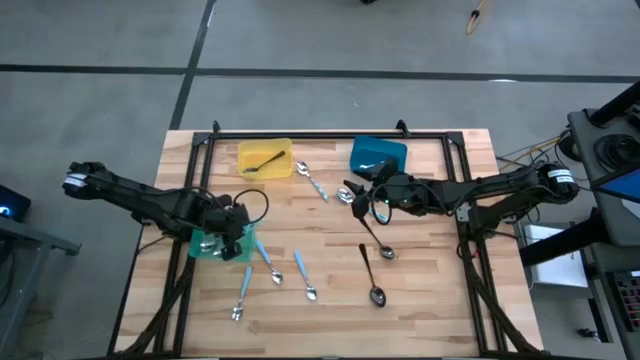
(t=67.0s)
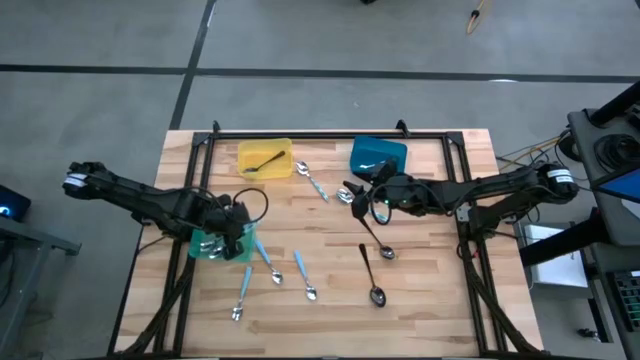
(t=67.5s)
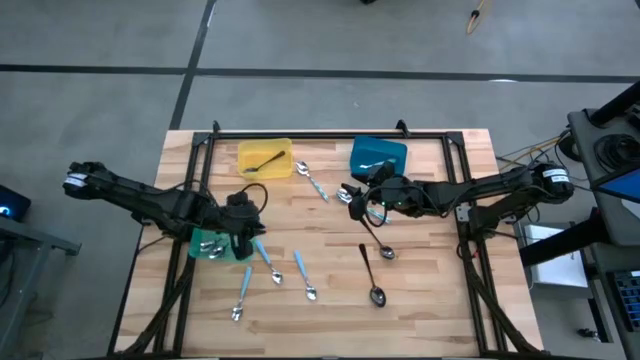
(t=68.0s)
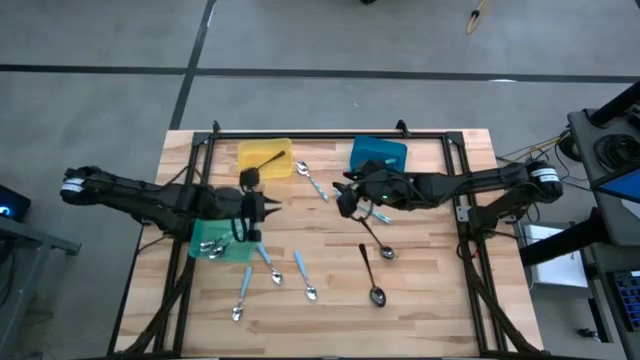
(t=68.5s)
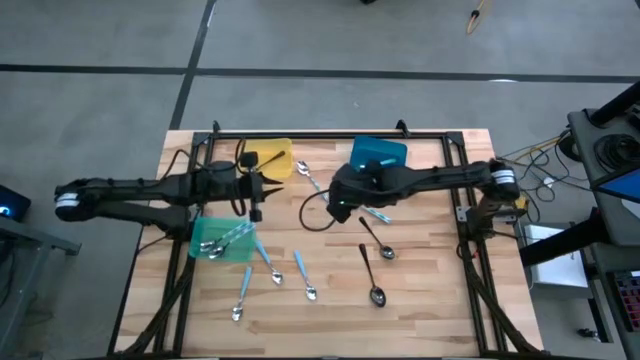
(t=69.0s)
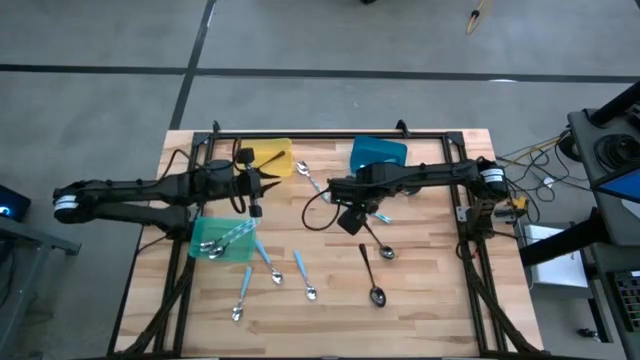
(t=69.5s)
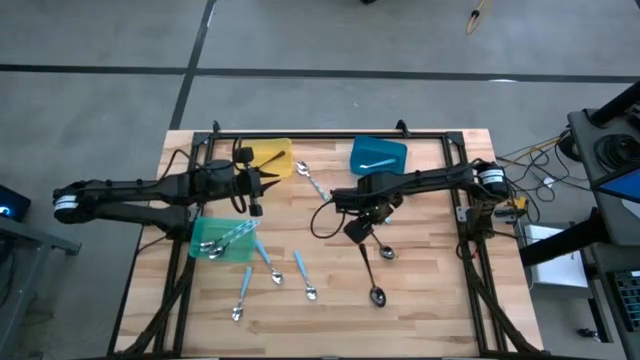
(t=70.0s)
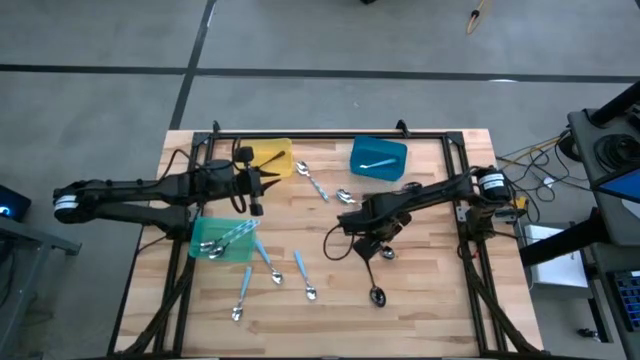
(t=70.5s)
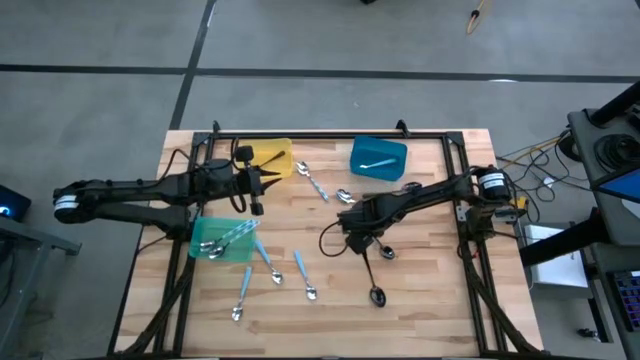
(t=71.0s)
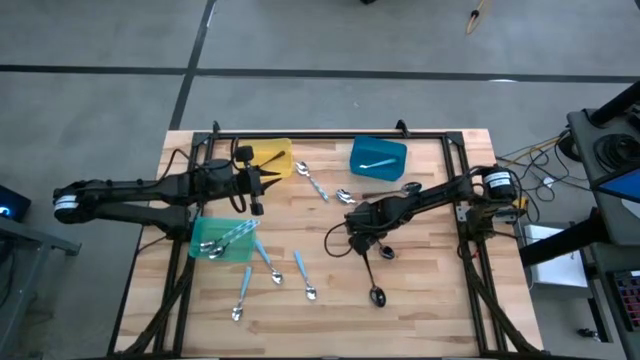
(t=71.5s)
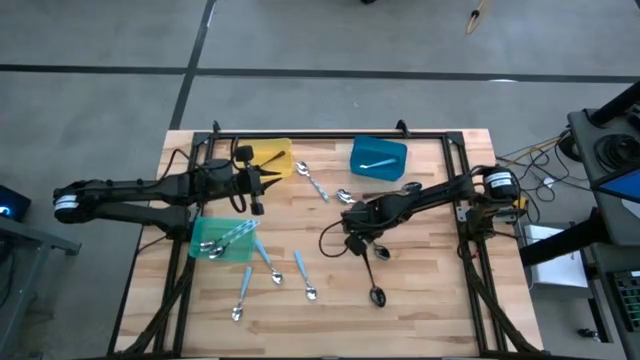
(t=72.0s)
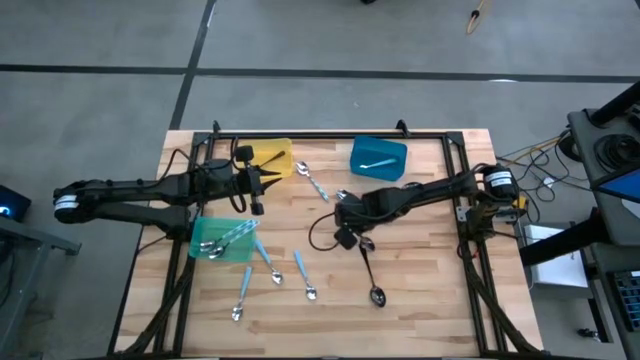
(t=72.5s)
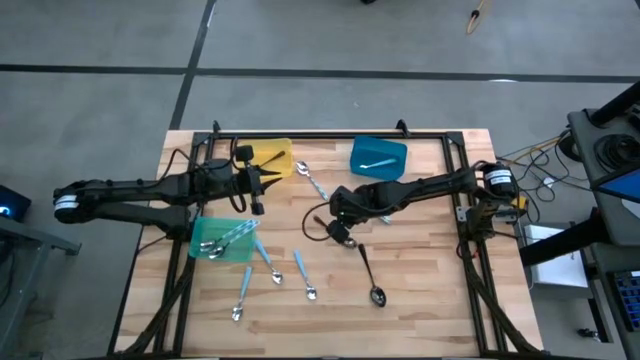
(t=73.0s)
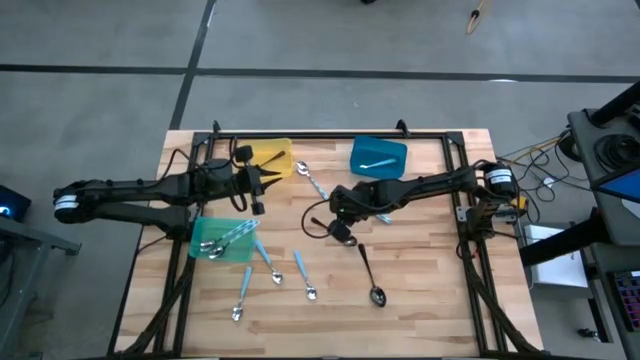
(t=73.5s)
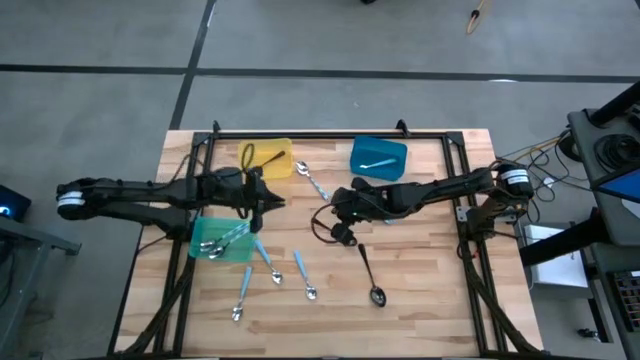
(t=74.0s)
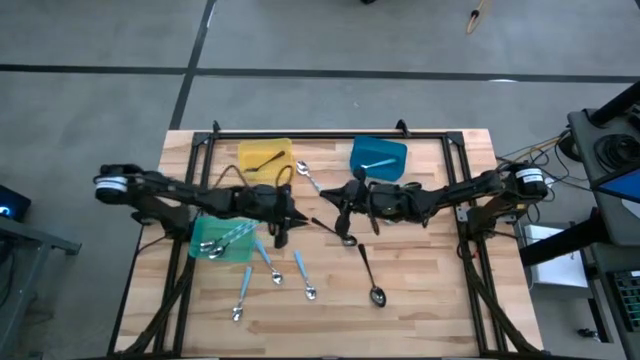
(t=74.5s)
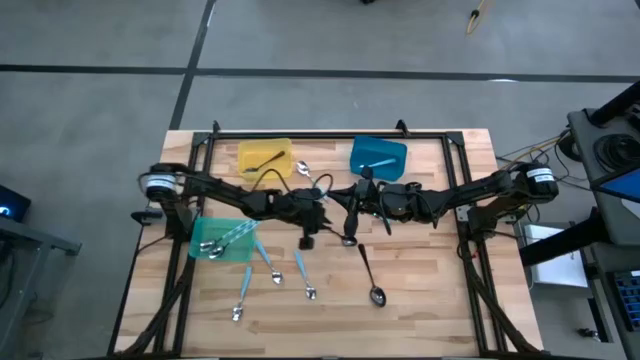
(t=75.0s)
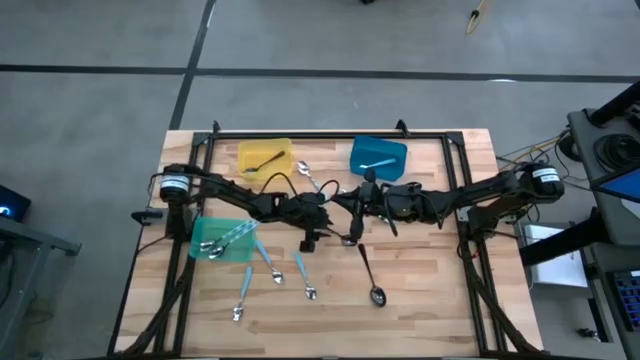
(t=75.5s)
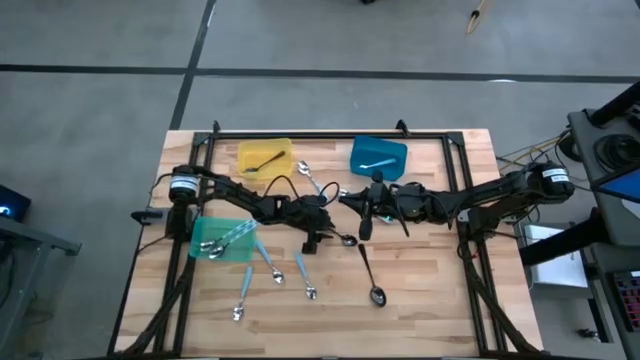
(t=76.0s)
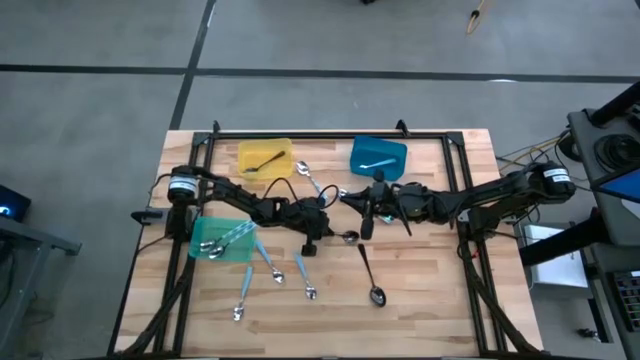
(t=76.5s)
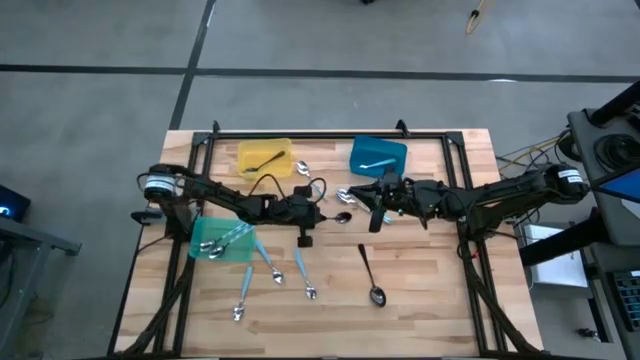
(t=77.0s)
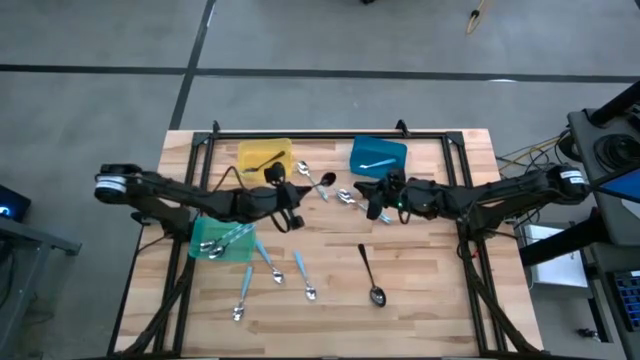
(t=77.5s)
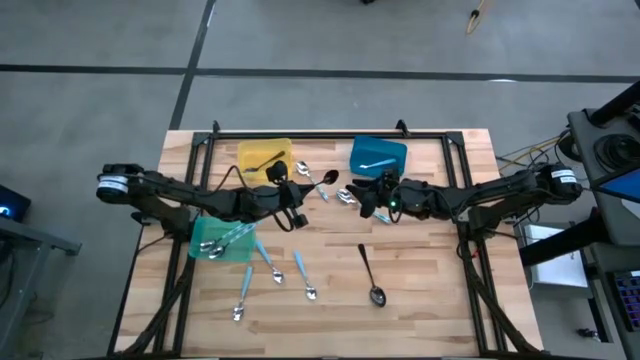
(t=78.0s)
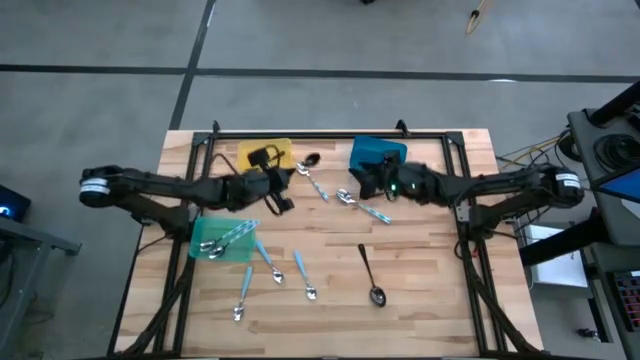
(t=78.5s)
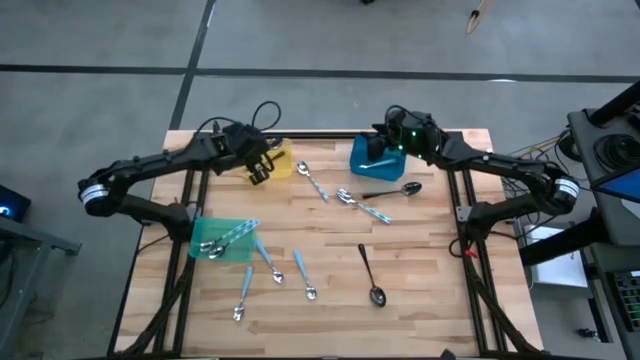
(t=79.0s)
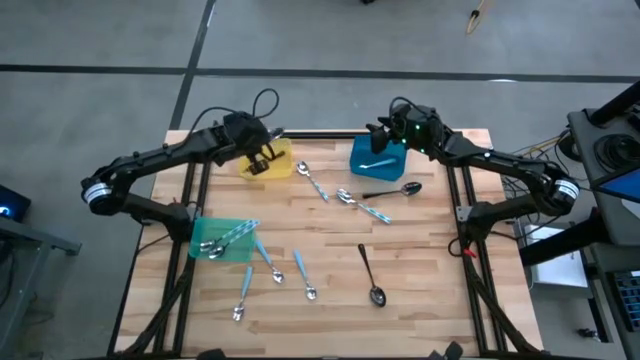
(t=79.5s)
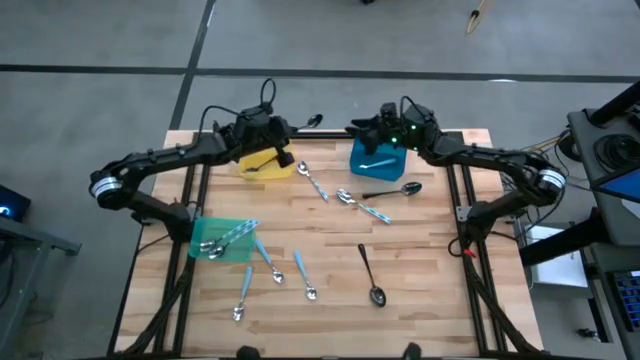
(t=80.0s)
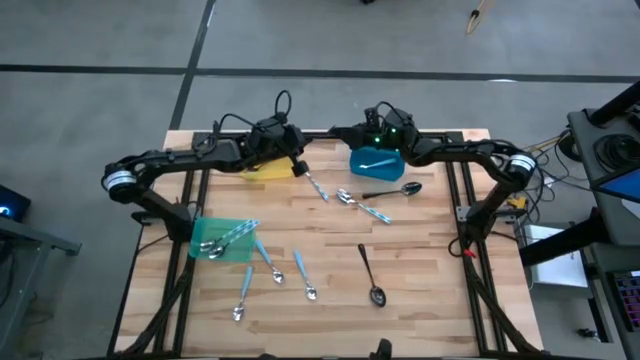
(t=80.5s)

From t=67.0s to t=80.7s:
Task: Sort silverware by color (type)
Put the black spoon into the yellow bin

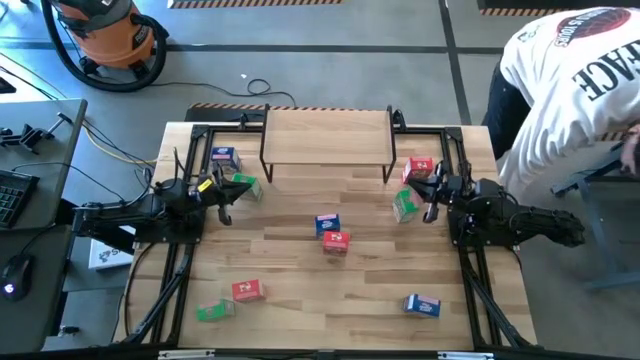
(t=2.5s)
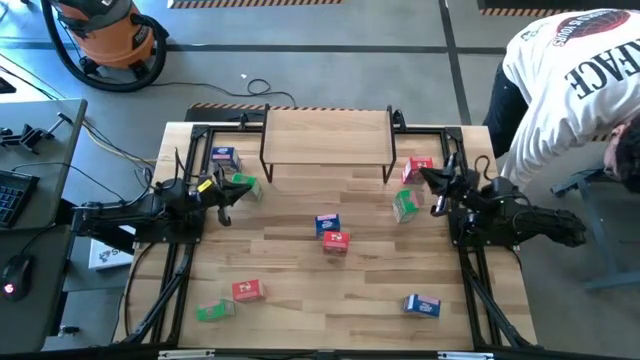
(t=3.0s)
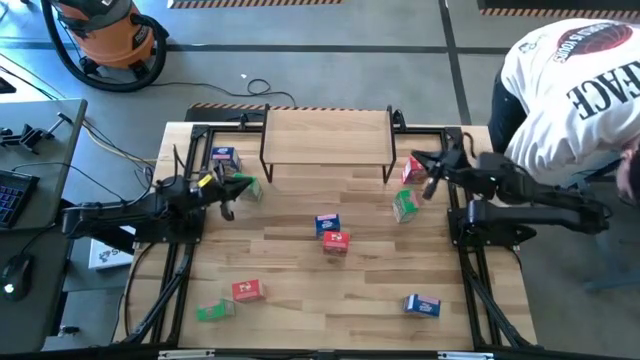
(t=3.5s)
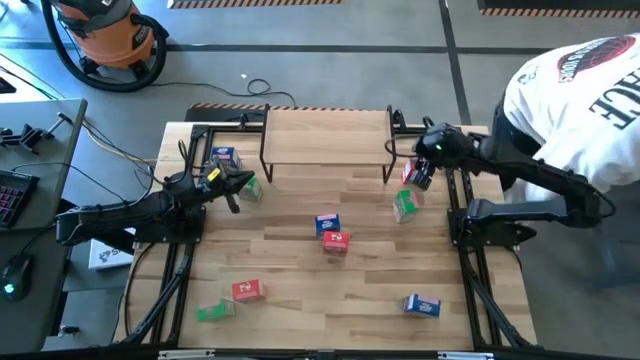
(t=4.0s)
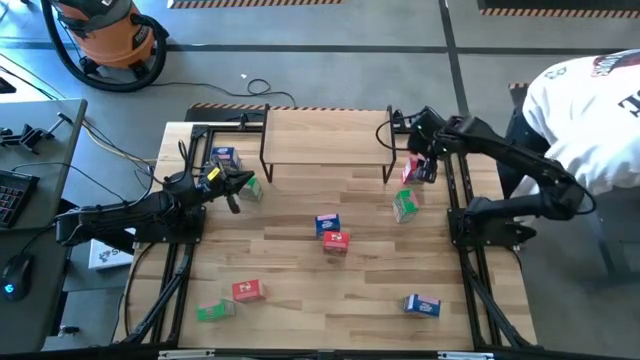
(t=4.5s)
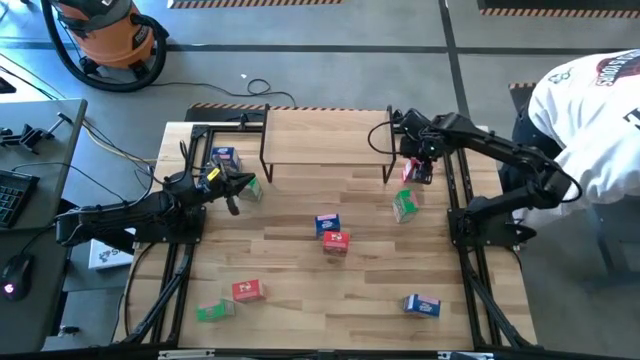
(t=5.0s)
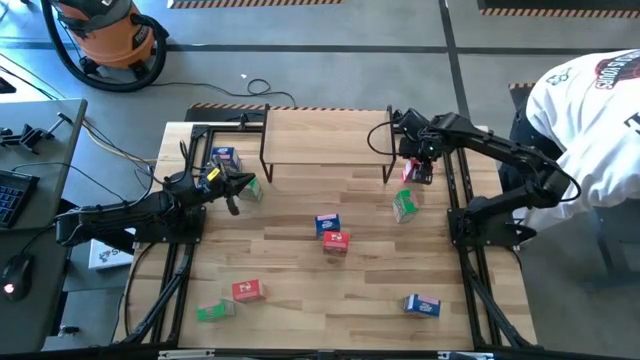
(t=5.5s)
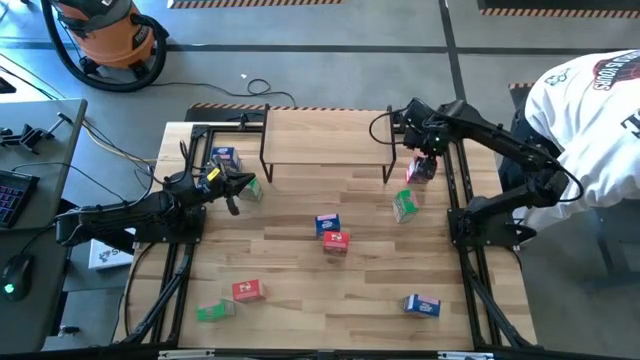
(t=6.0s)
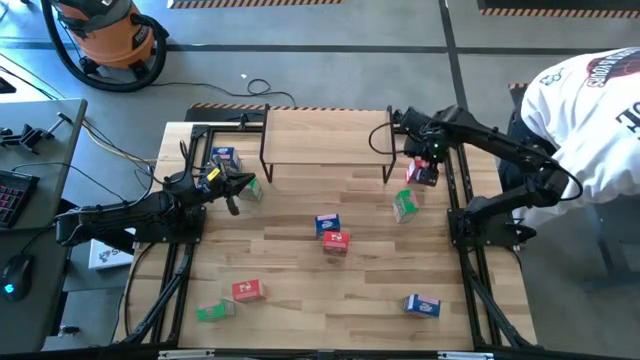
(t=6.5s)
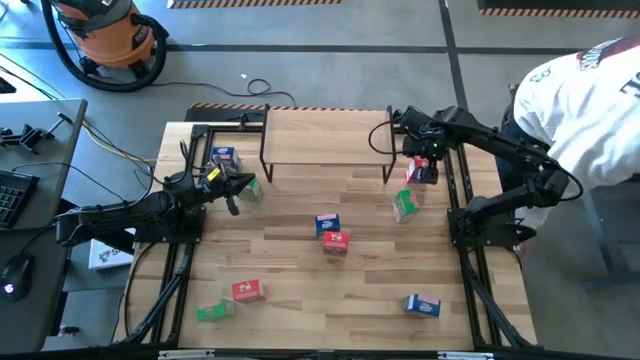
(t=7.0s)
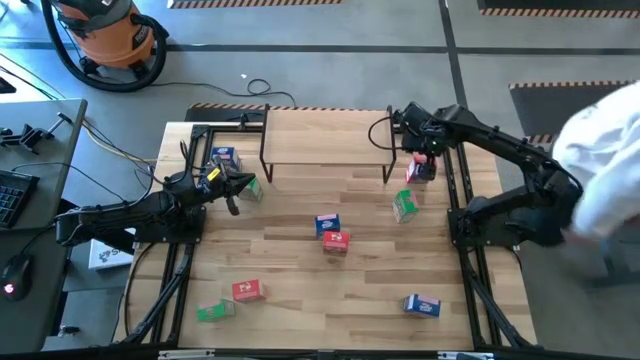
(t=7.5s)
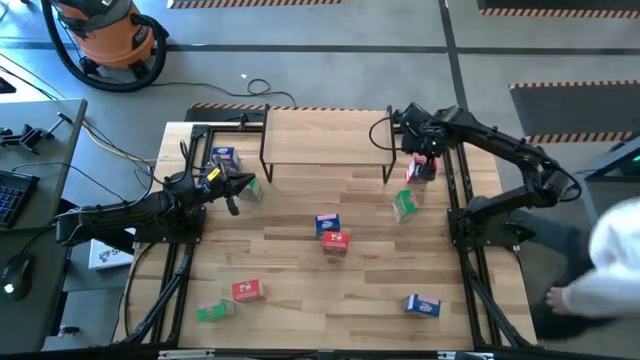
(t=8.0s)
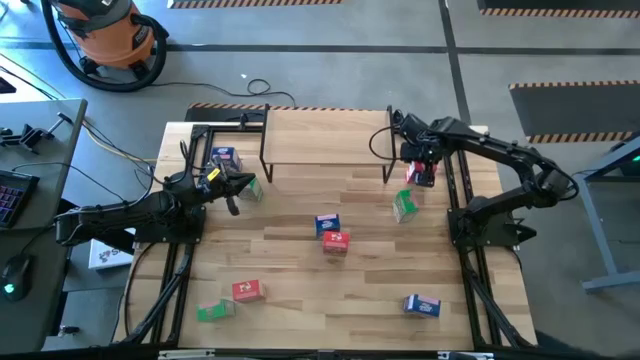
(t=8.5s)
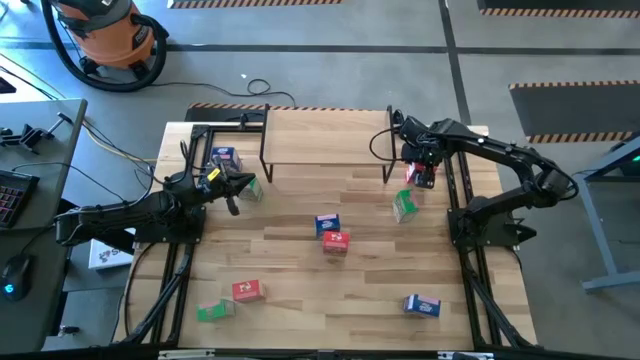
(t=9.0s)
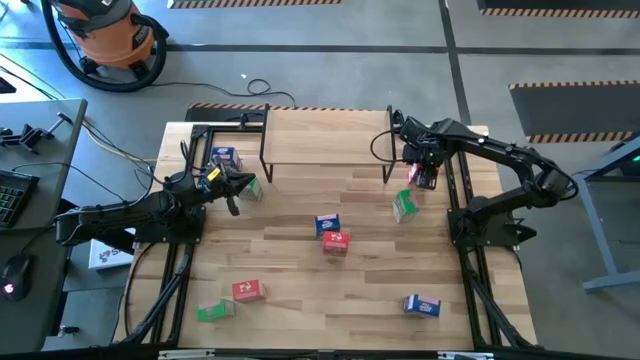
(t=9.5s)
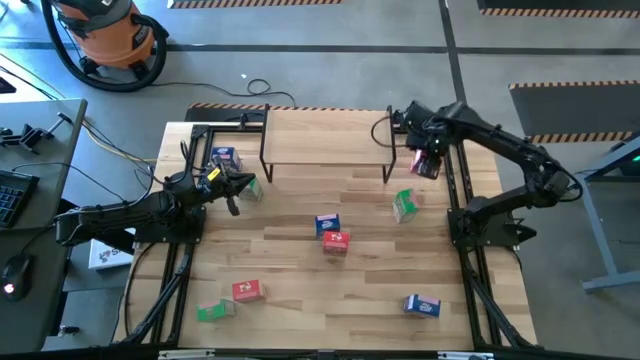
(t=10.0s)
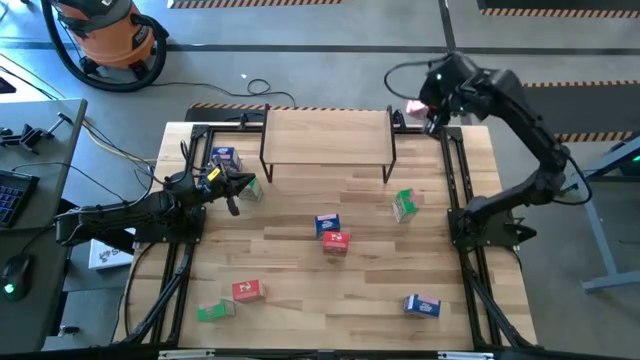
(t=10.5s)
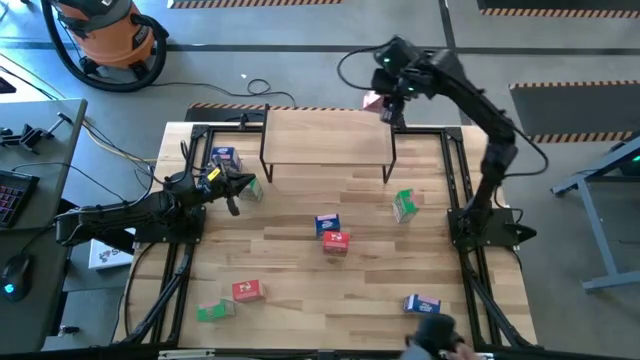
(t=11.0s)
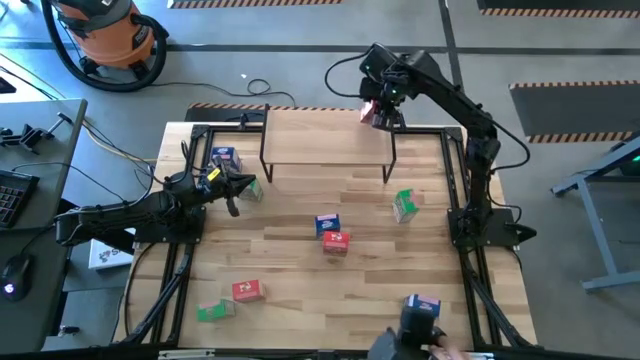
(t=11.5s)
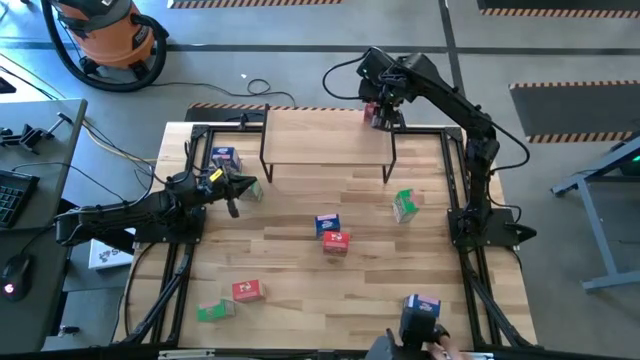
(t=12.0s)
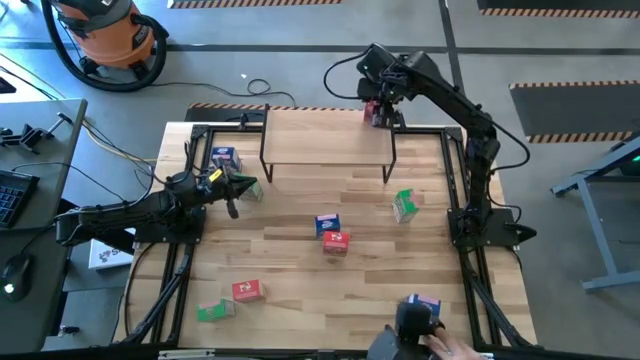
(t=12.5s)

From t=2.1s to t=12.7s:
Task: Stack cereal on shelf
Put the top right red cereal box on the shelf
